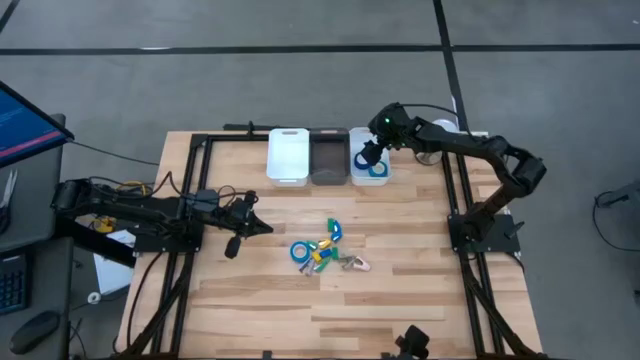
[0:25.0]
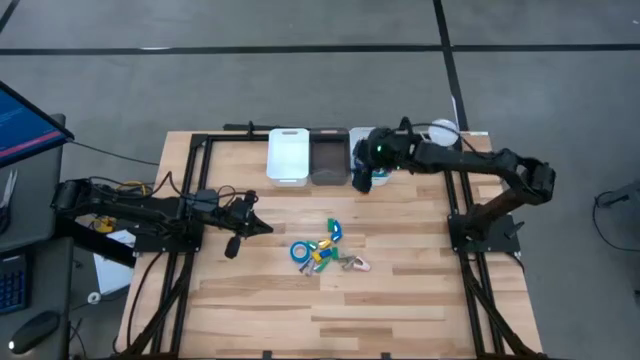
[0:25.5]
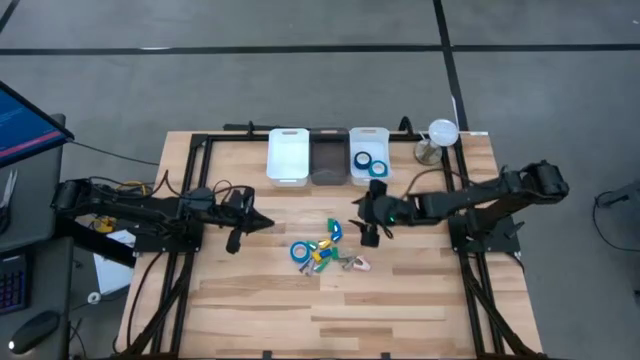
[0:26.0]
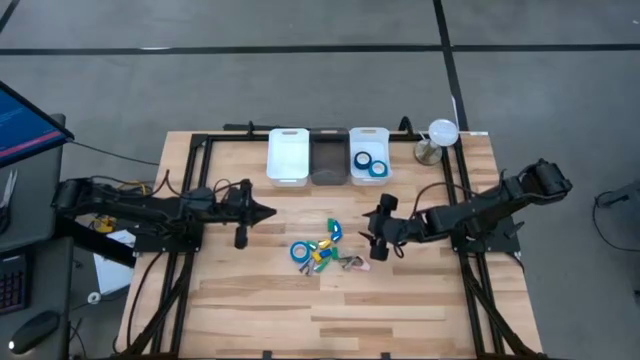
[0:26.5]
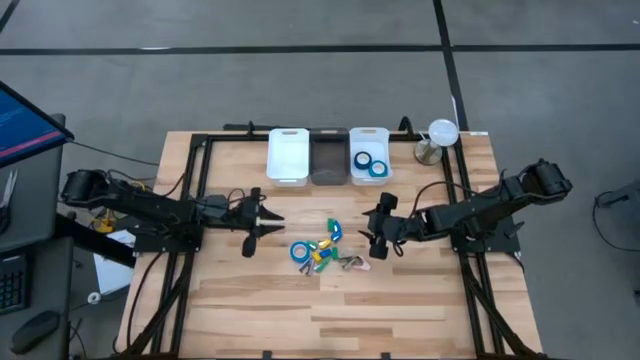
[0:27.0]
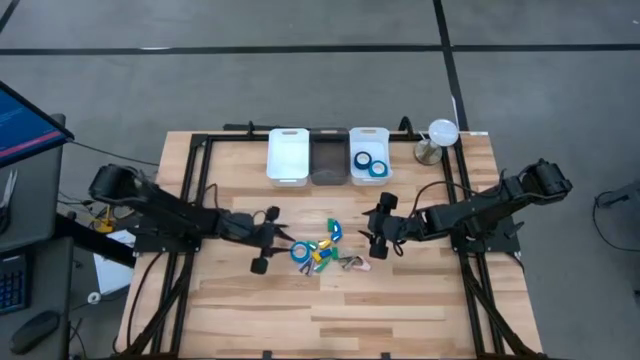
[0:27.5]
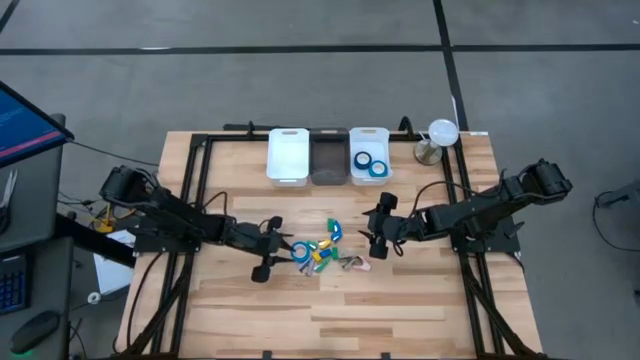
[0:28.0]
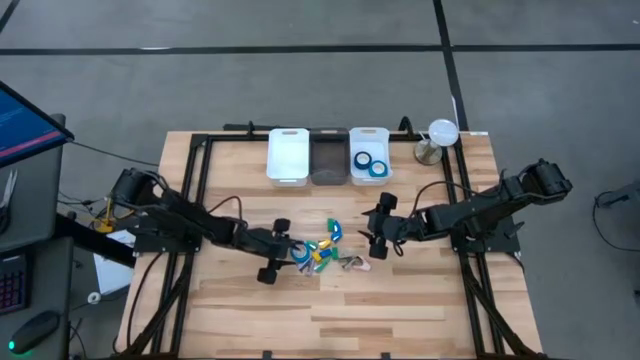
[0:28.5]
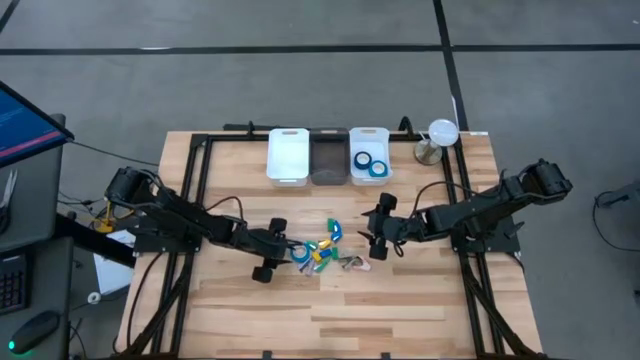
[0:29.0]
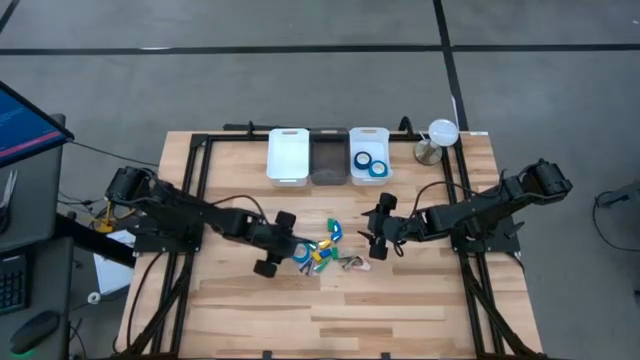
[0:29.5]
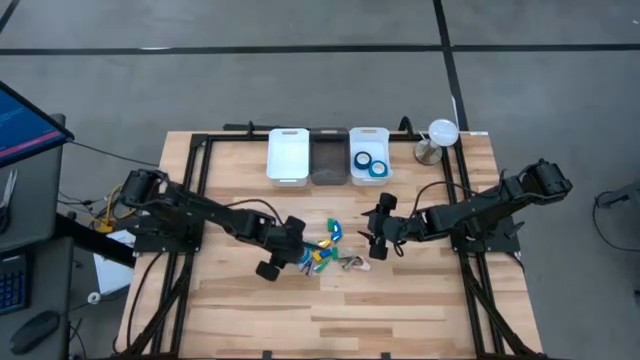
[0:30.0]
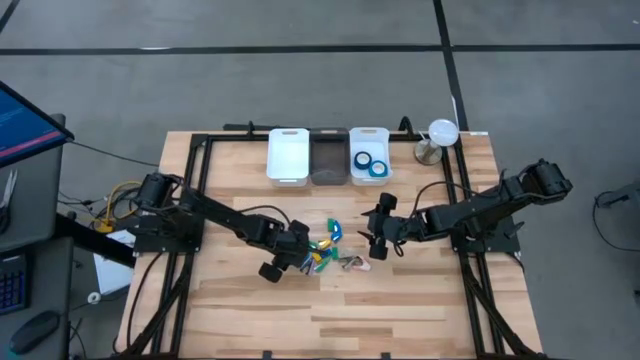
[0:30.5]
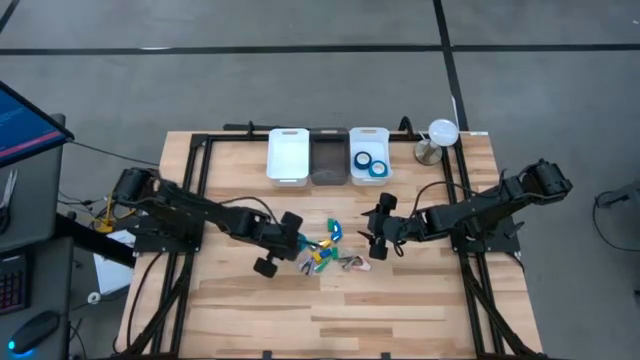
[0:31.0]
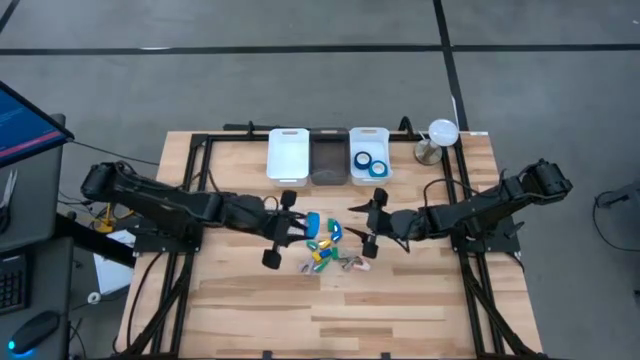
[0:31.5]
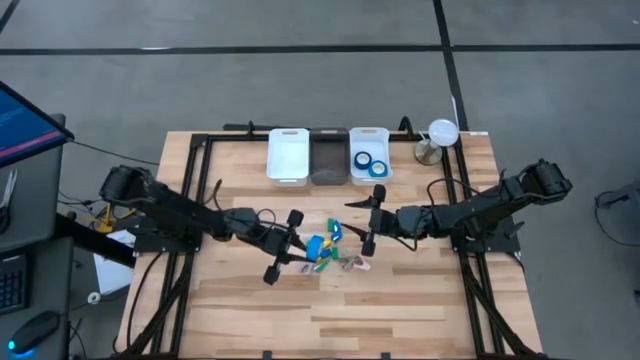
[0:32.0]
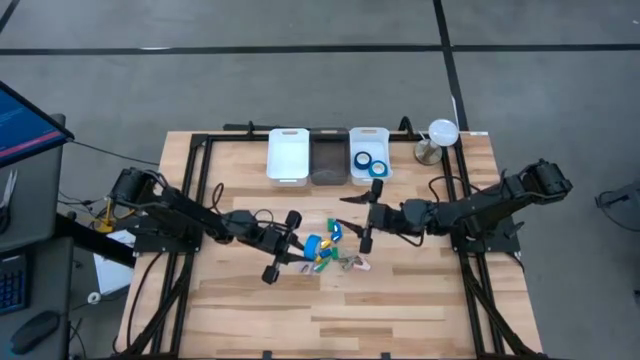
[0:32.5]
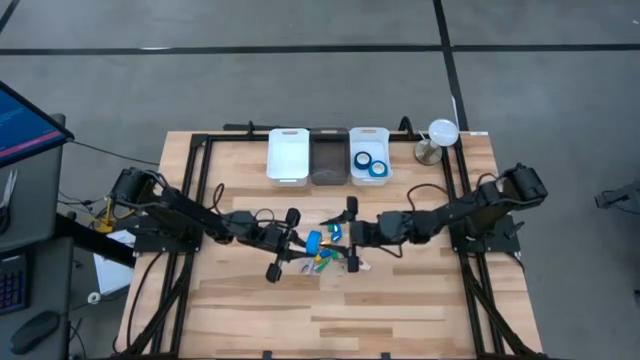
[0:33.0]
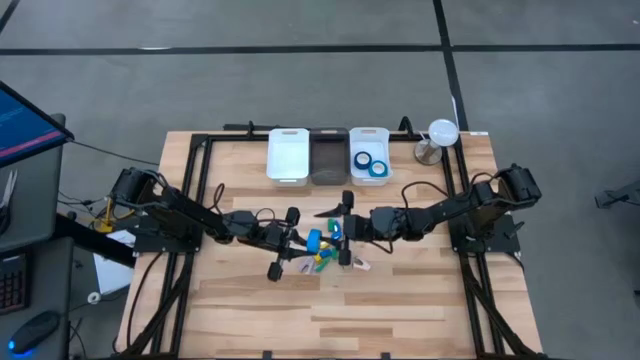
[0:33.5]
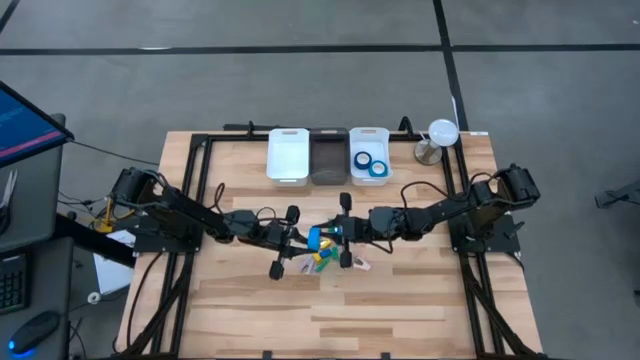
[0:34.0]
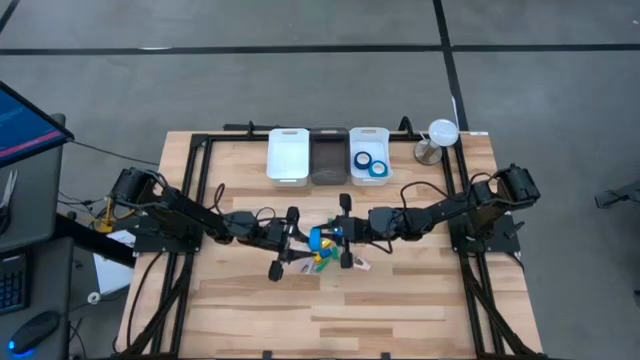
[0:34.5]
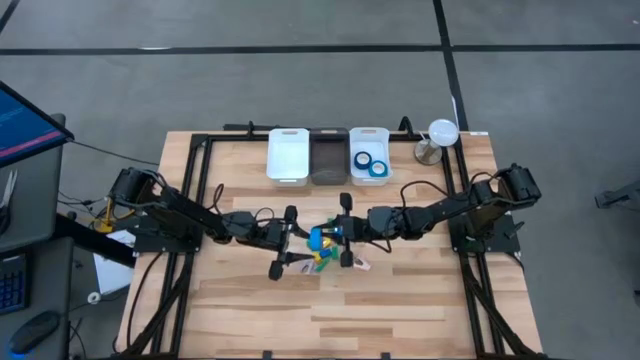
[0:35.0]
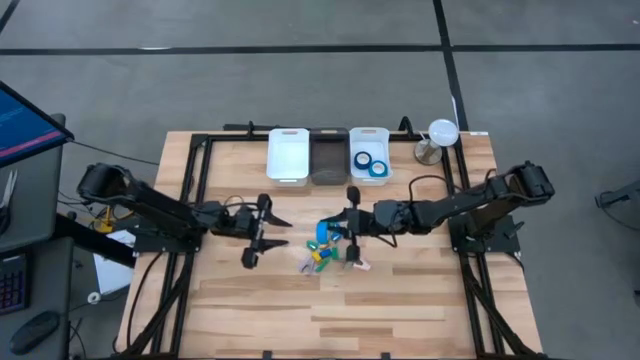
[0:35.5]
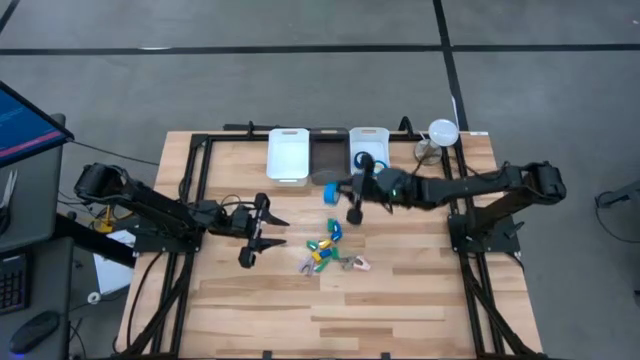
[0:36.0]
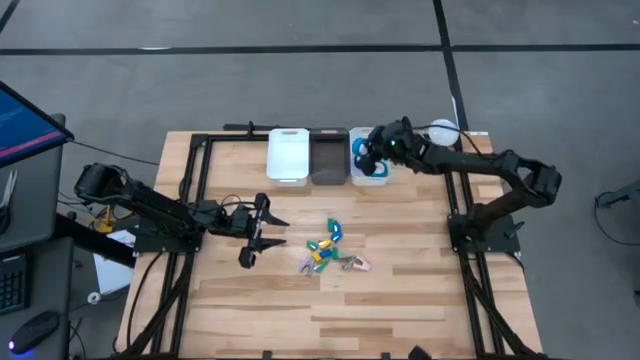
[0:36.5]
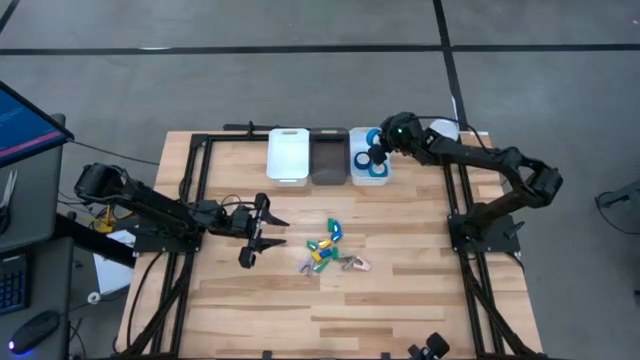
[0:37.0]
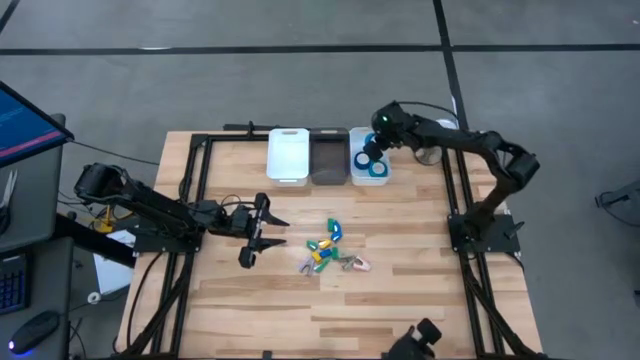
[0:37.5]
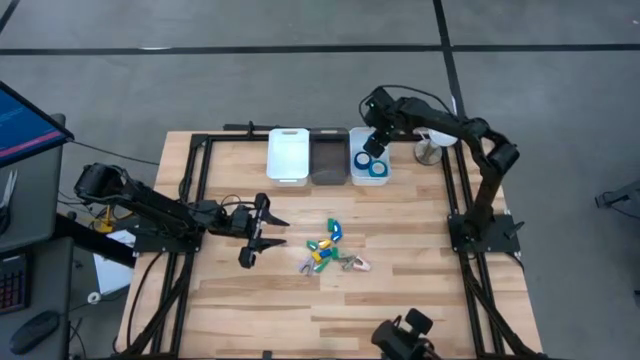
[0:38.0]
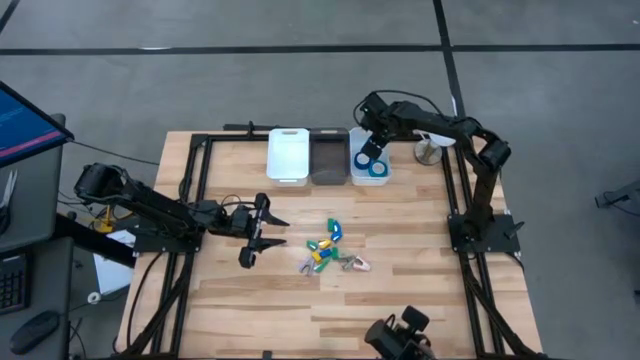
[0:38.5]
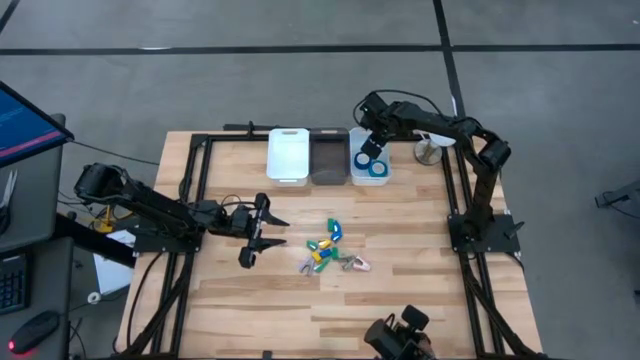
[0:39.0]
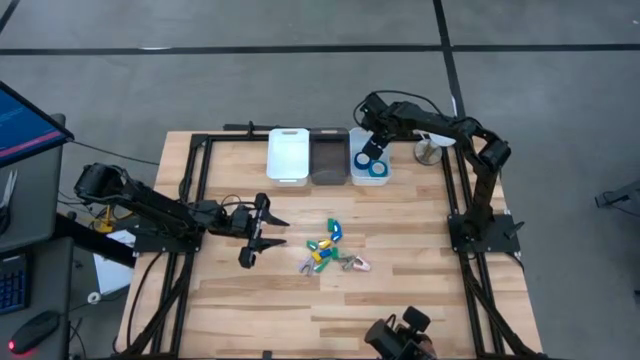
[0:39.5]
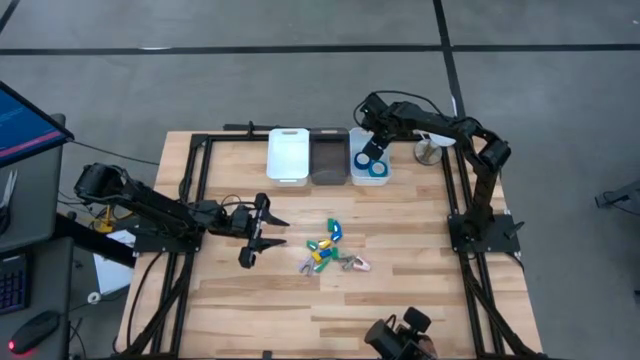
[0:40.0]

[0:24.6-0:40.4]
Task: Pick and place Stapler, Stapler remover, tape
Put the blue tape into the right white bin
